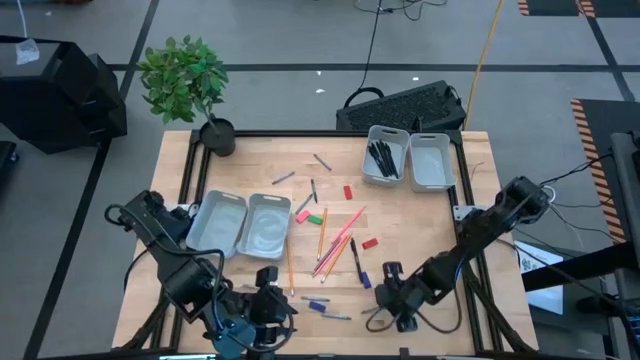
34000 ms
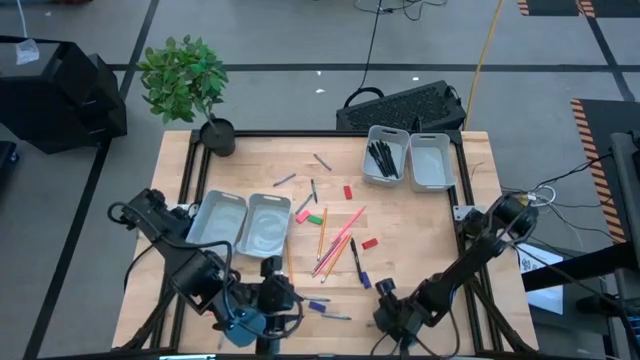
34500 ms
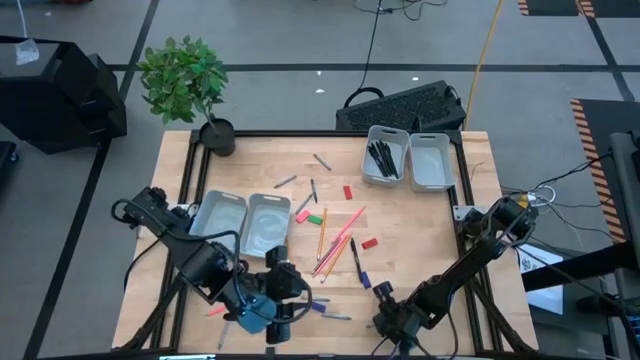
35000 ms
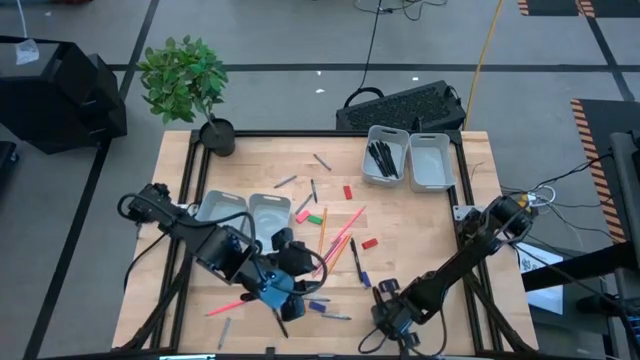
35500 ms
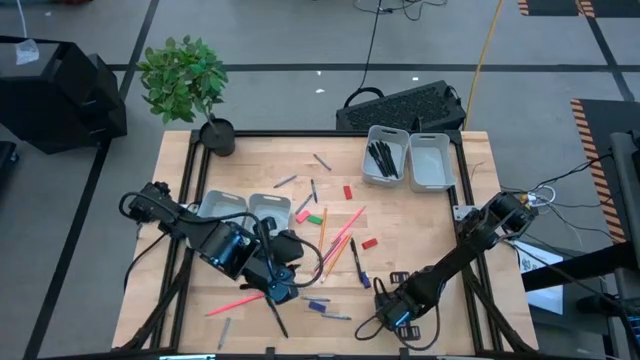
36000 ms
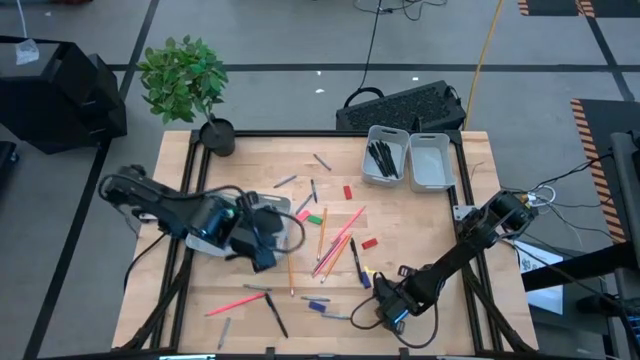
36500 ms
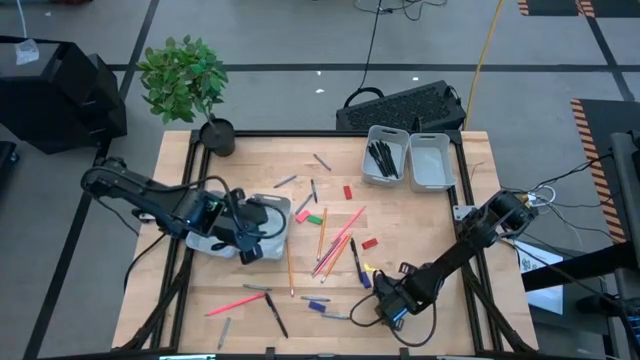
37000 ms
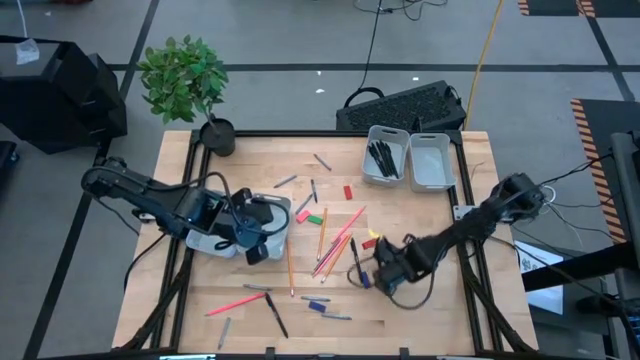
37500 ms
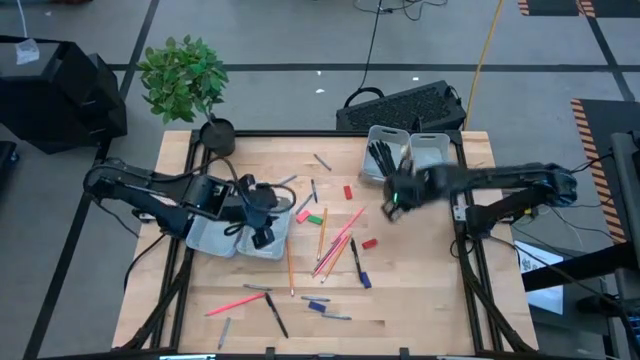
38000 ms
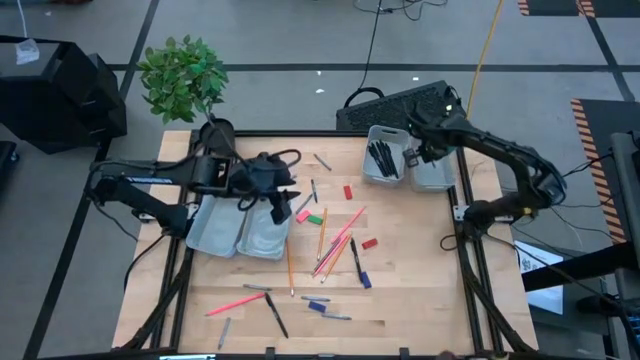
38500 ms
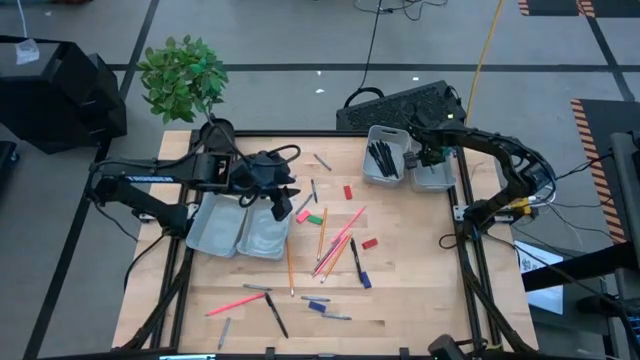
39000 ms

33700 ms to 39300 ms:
Task: Sort crayons/erasers/pens/pencils in bins
Put the gray crayon into the top right gray bin

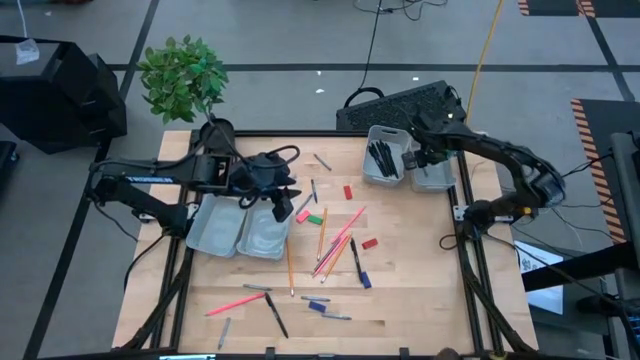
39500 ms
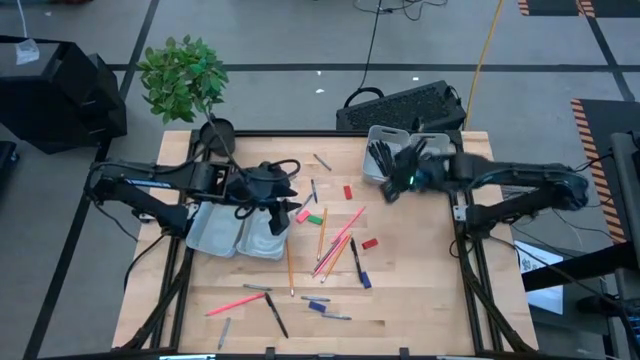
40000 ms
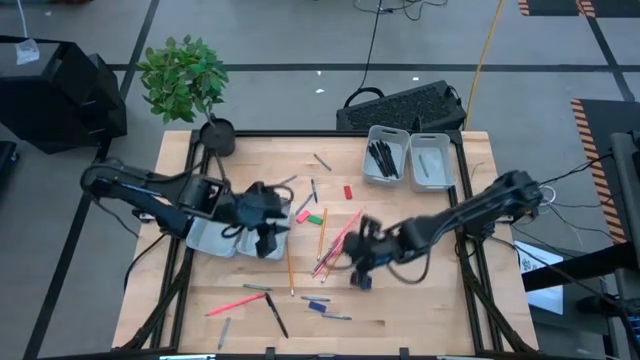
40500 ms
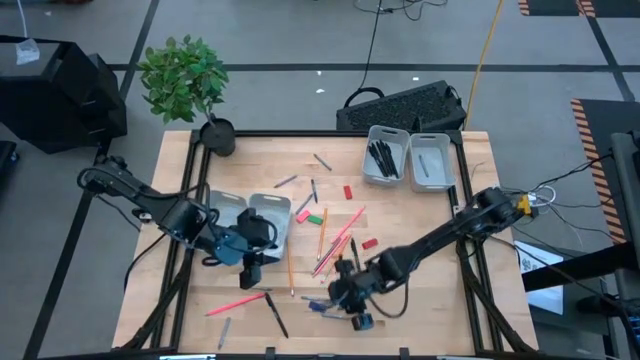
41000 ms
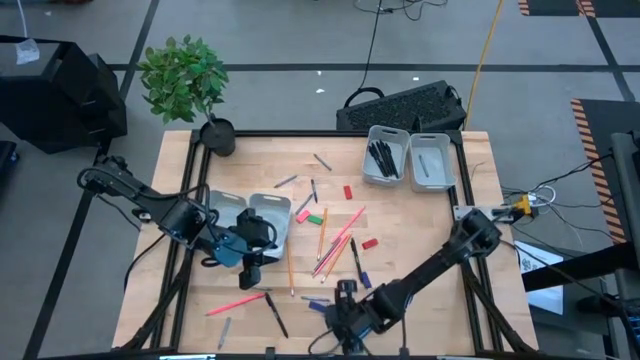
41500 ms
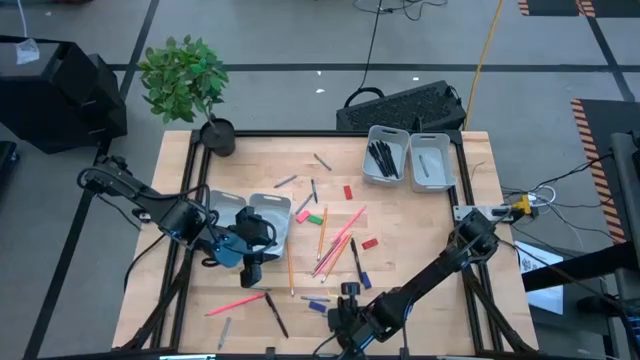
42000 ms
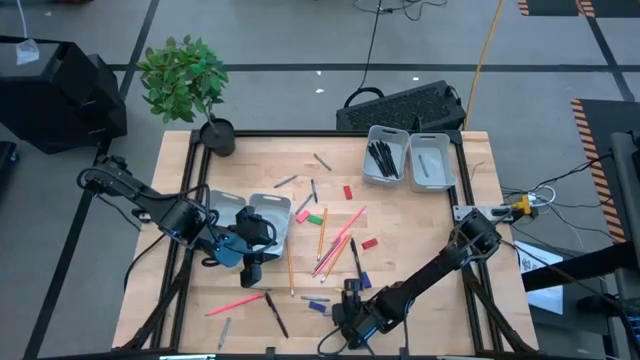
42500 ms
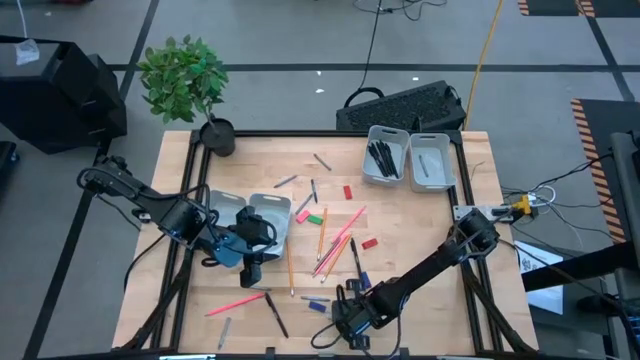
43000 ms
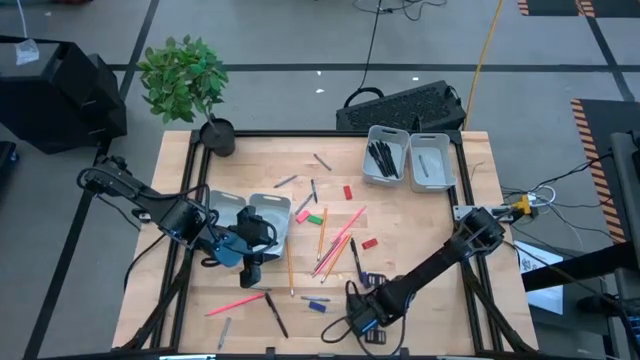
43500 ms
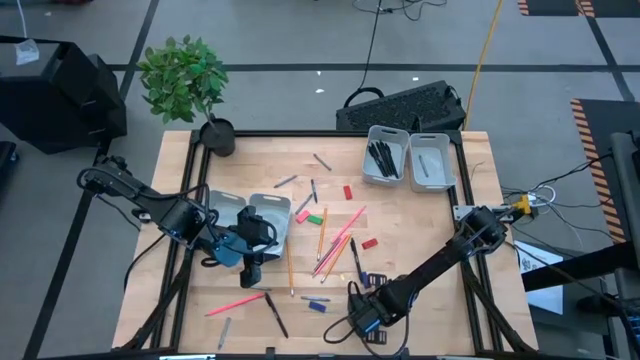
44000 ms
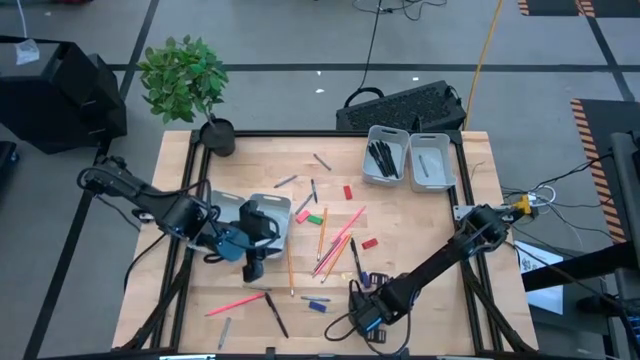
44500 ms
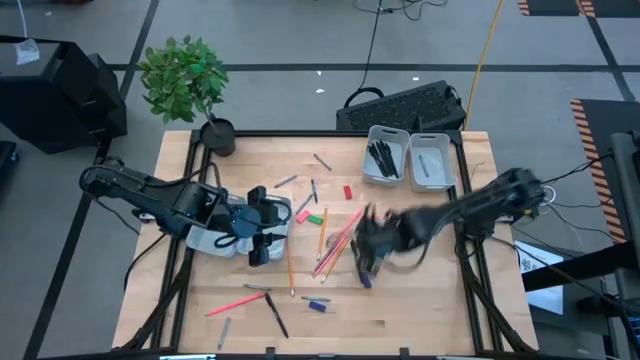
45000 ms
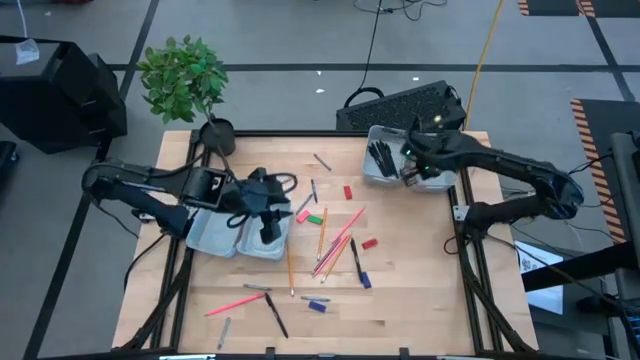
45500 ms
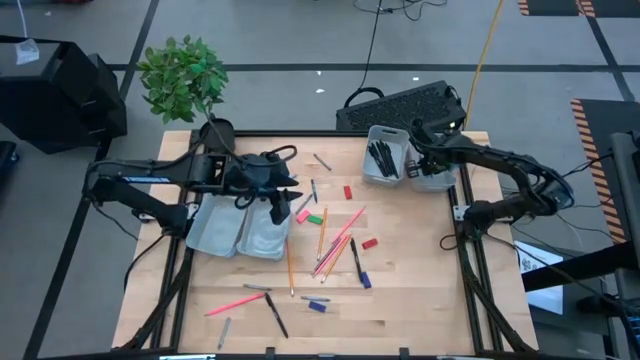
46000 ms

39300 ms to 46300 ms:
Put the gray crayon into the top right gray bin

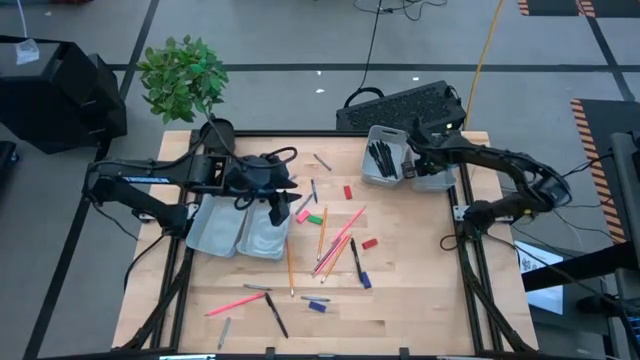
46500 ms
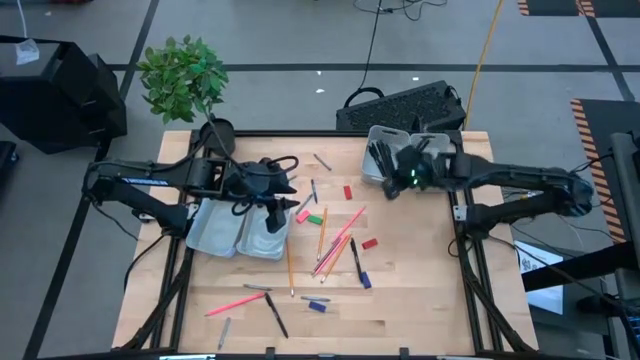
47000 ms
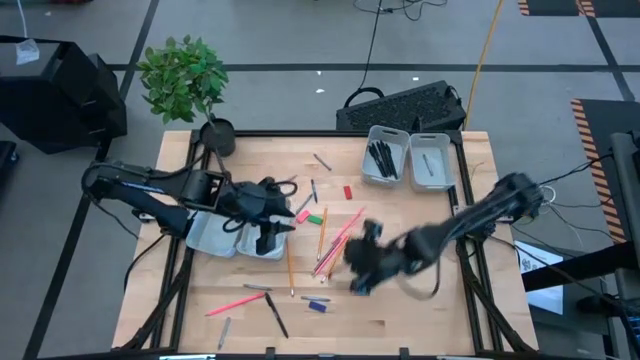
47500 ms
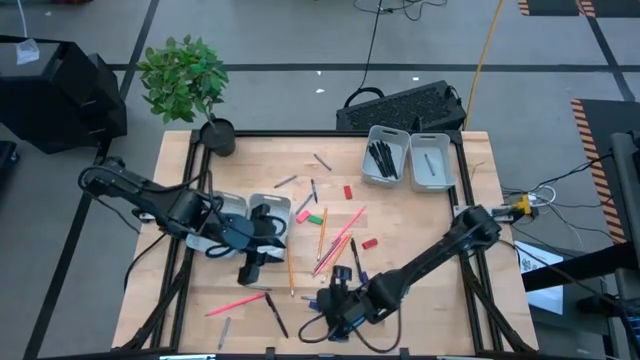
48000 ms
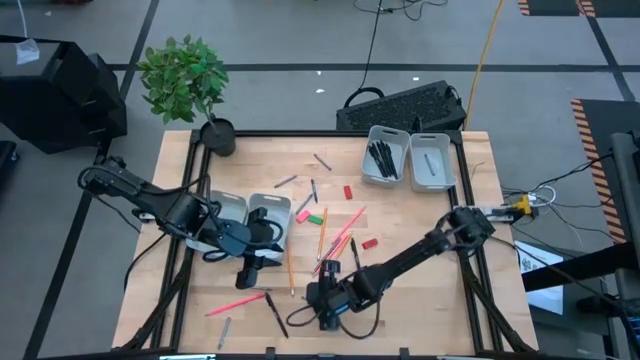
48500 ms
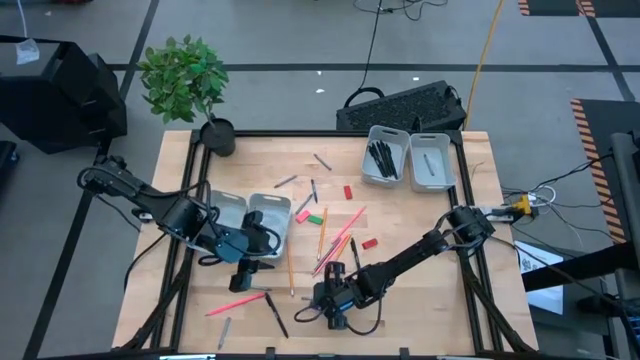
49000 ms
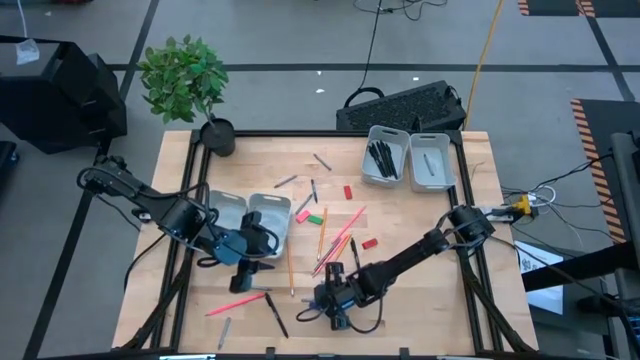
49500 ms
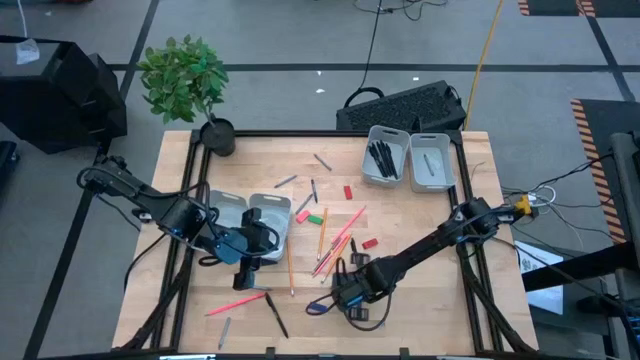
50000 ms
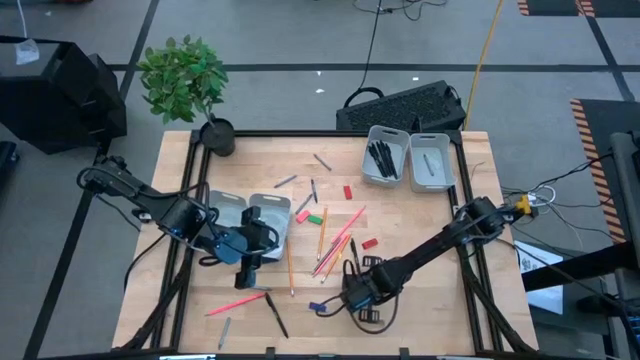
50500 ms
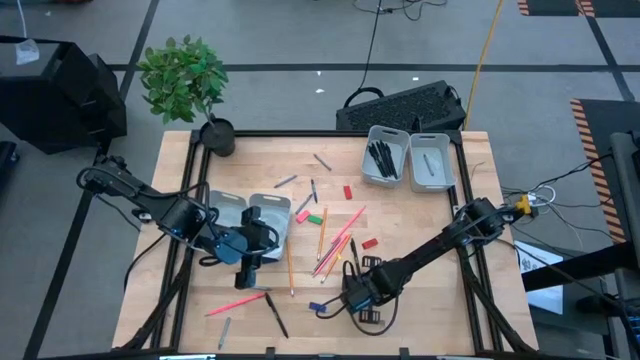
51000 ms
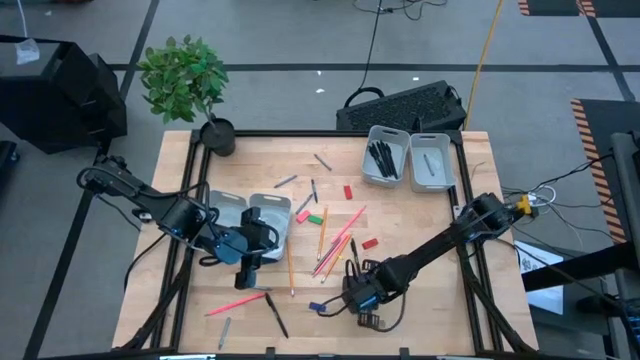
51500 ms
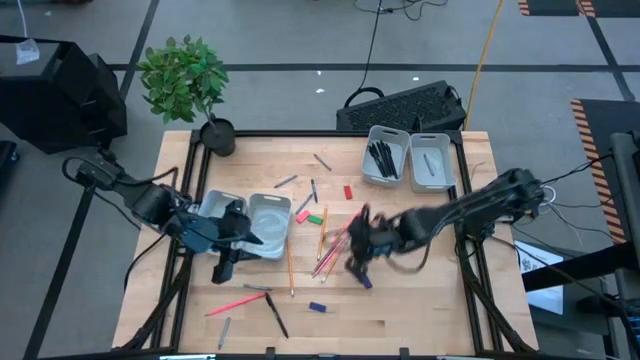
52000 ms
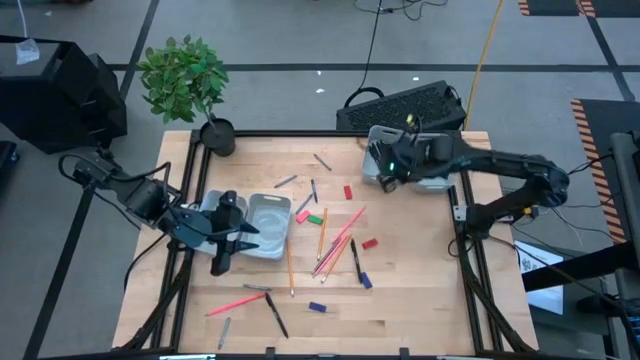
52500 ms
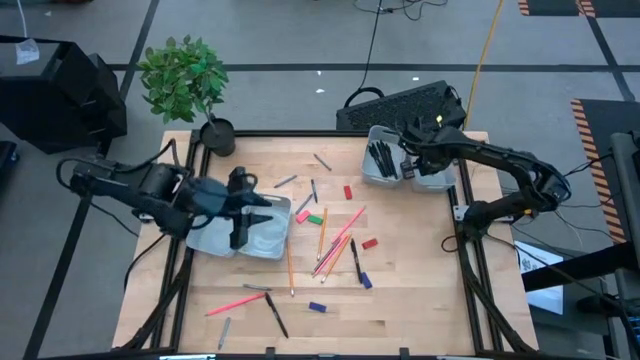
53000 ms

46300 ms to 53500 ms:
Put the gray crayon into the top right gray bin

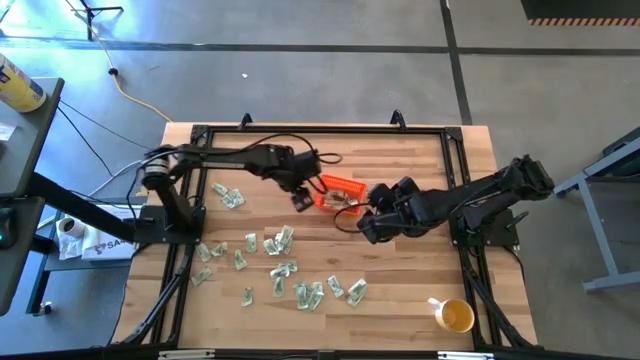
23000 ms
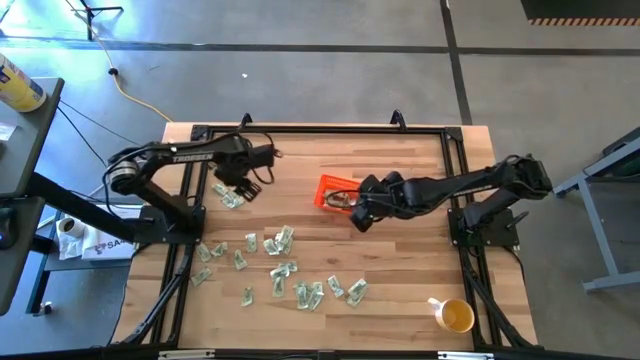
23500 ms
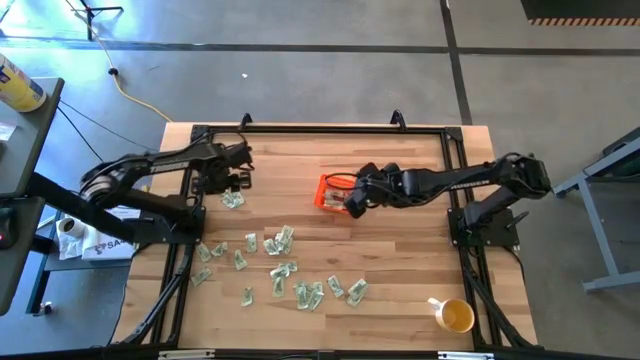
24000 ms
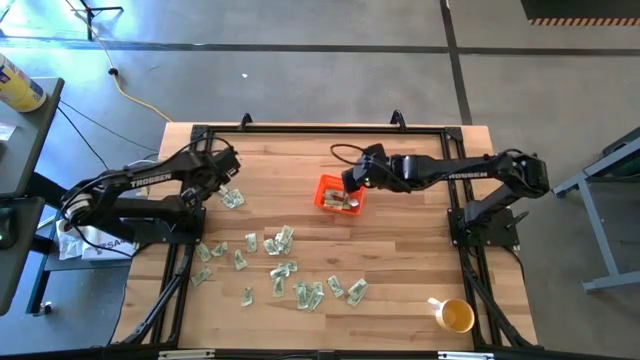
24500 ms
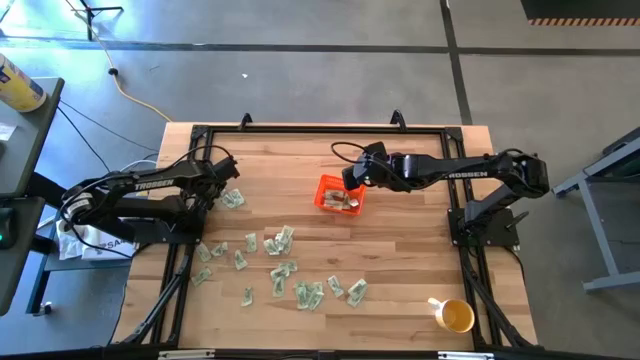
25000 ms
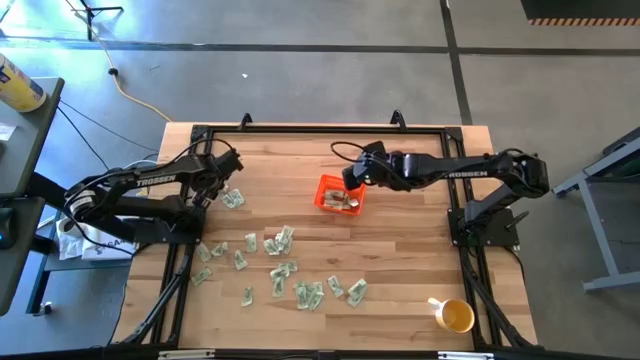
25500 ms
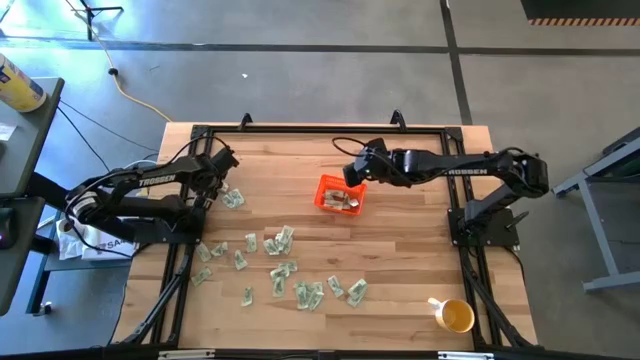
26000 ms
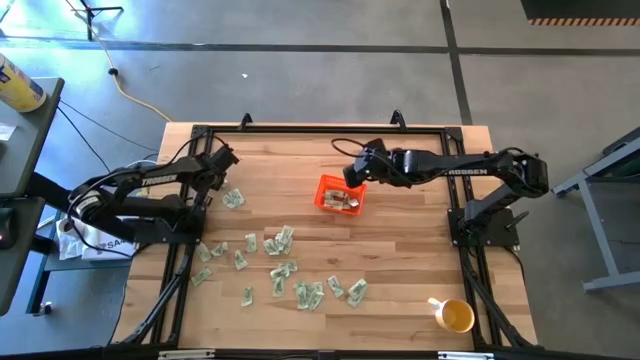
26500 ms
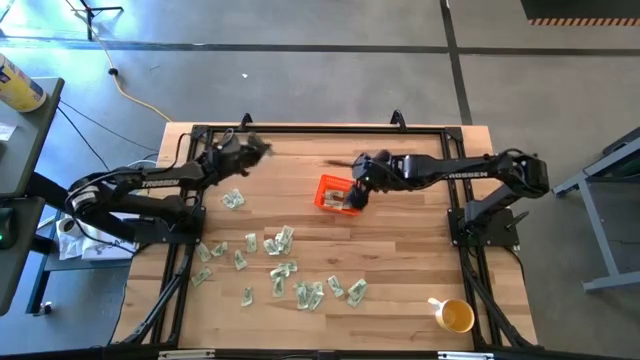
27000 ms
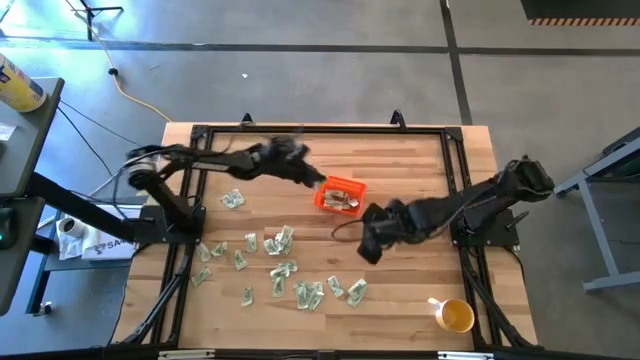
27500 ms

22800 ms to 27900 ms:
Task: Pick and place Stevia / Truvia into bins
Put the green stevia packet into the orange basket
